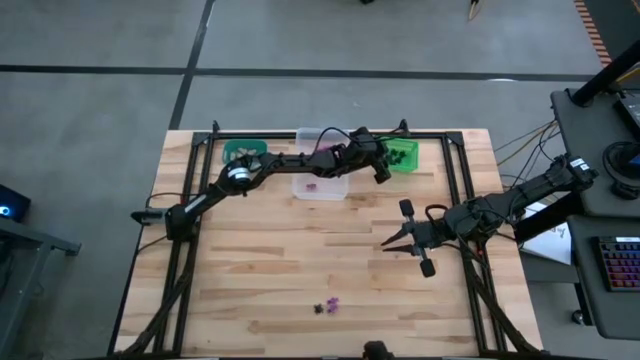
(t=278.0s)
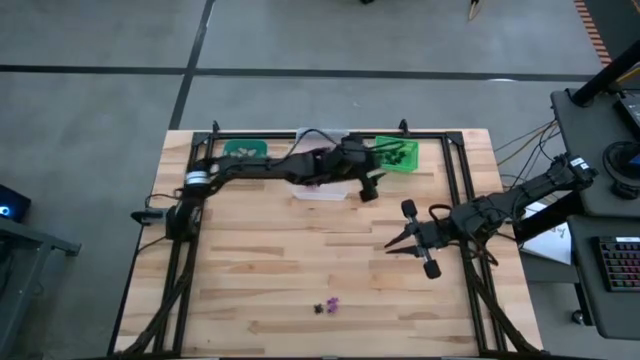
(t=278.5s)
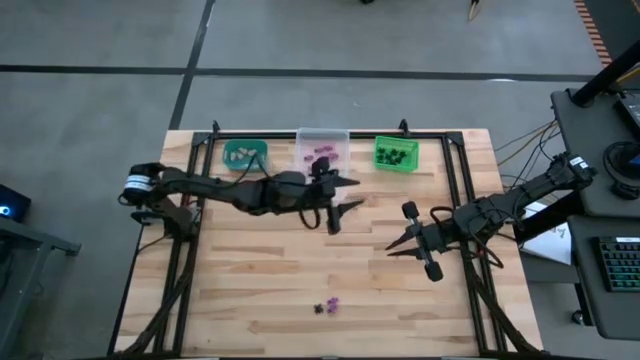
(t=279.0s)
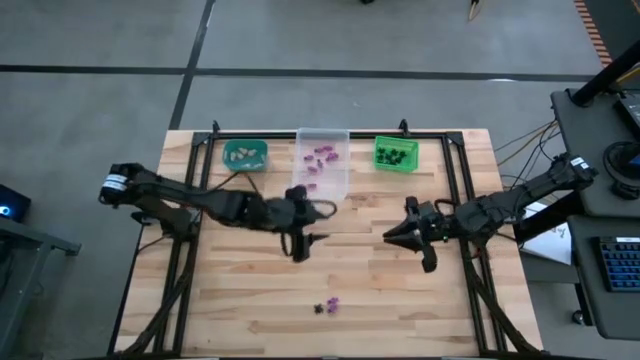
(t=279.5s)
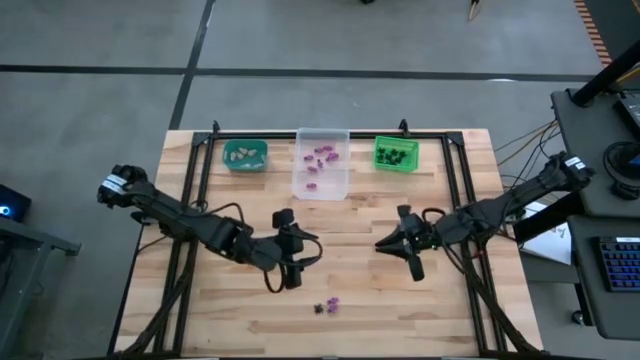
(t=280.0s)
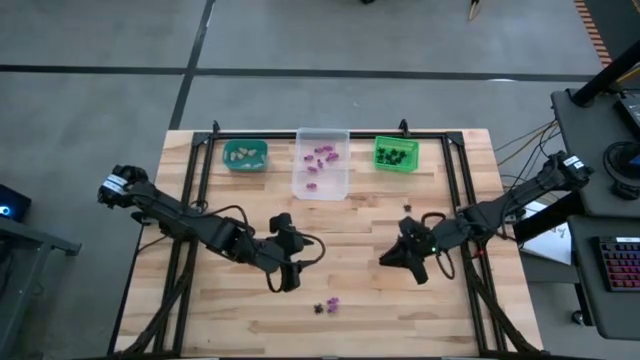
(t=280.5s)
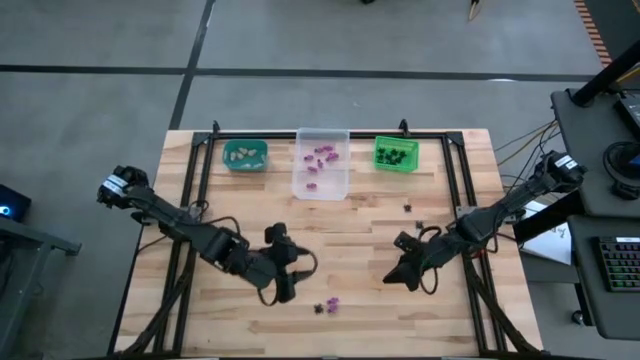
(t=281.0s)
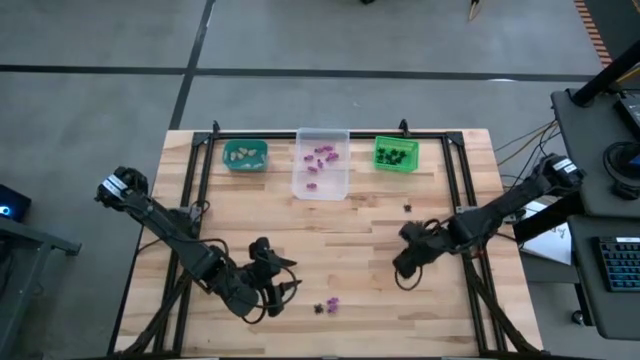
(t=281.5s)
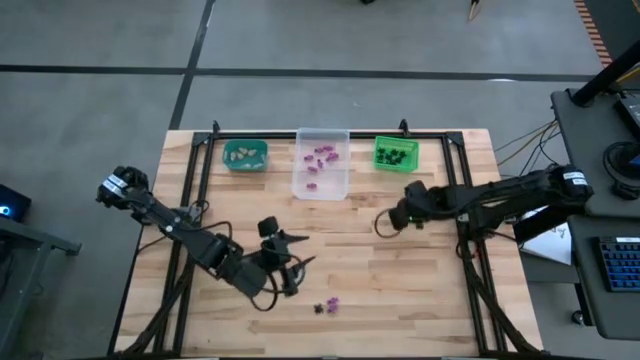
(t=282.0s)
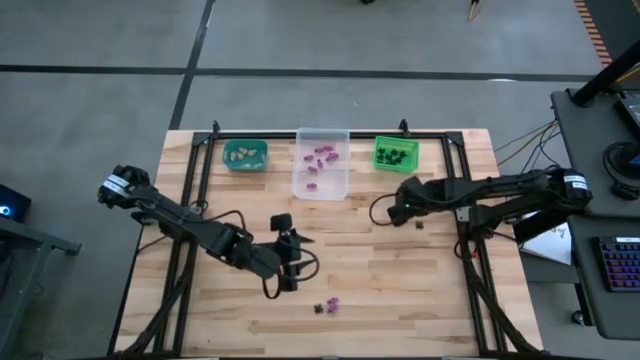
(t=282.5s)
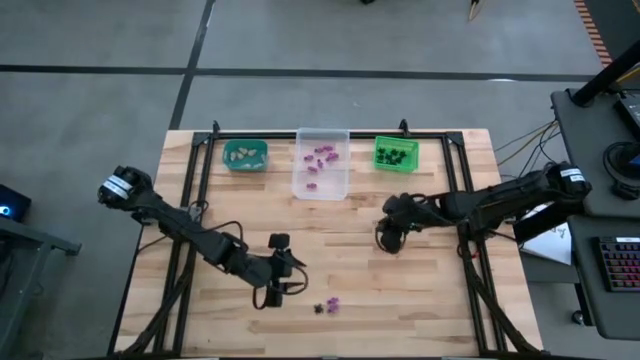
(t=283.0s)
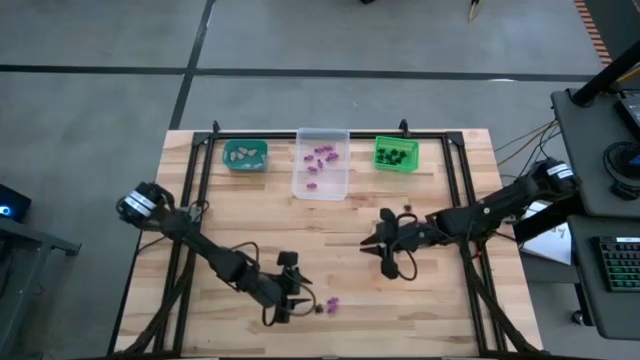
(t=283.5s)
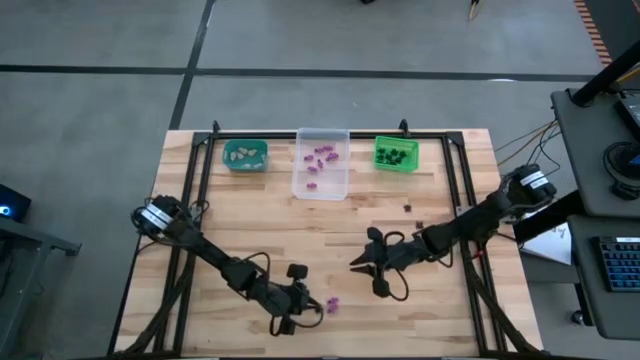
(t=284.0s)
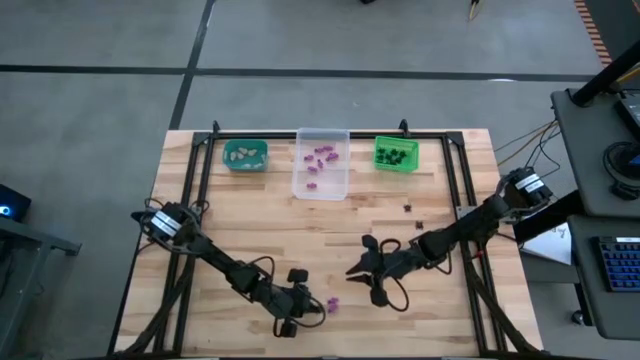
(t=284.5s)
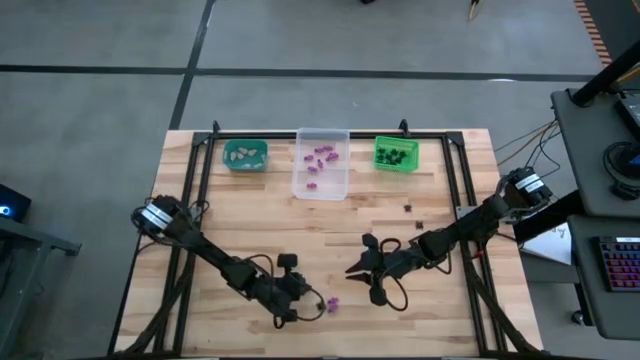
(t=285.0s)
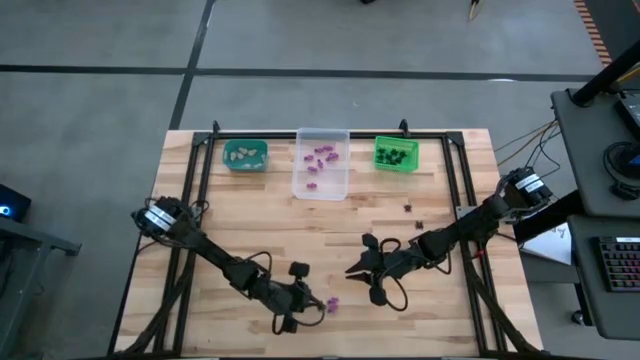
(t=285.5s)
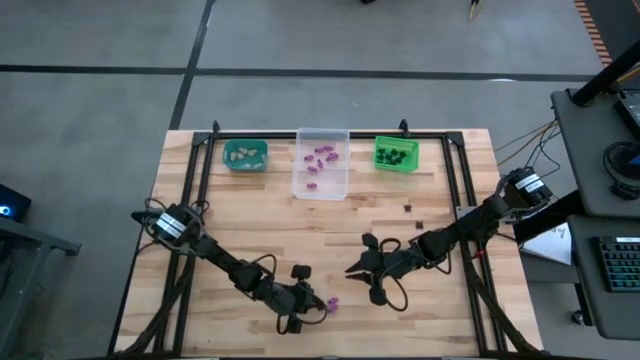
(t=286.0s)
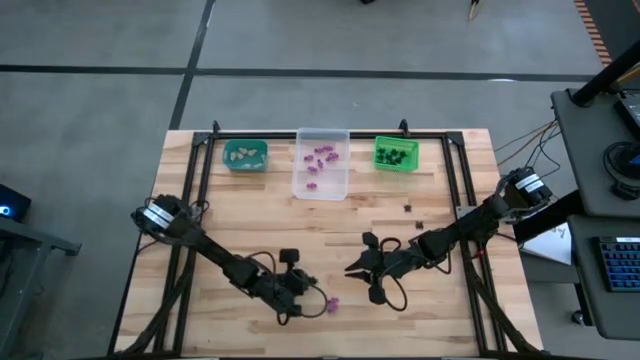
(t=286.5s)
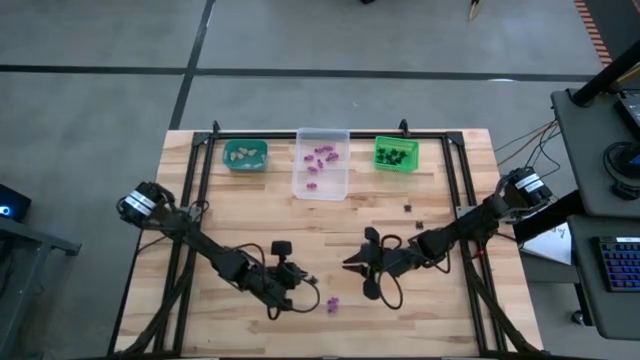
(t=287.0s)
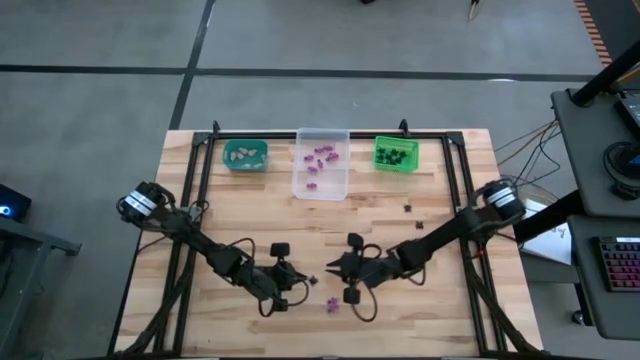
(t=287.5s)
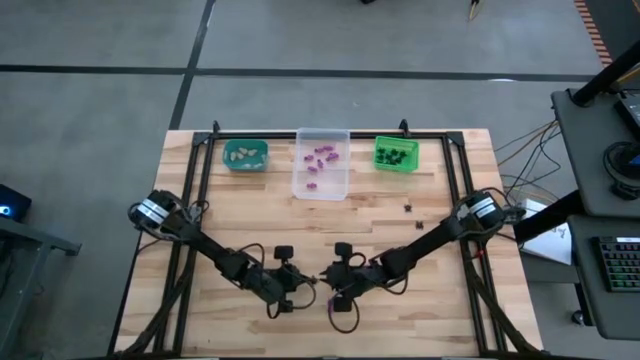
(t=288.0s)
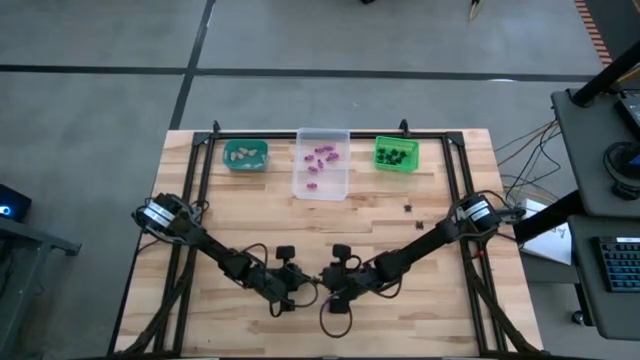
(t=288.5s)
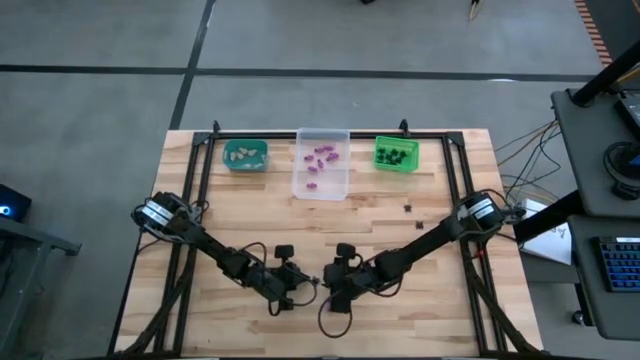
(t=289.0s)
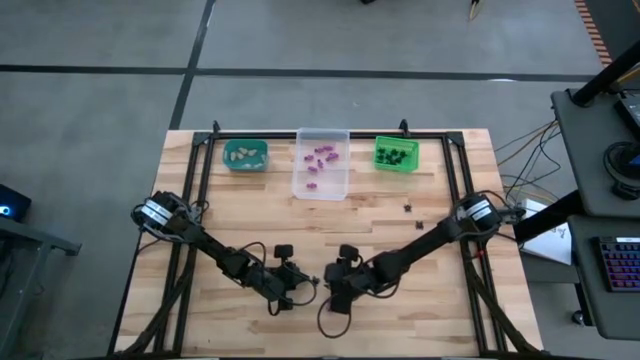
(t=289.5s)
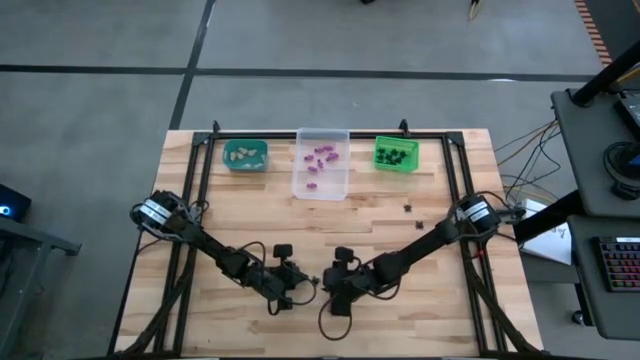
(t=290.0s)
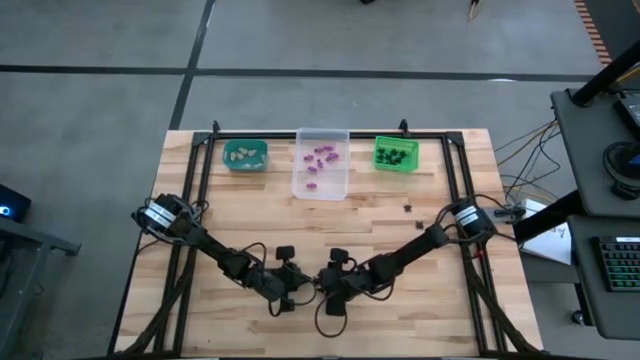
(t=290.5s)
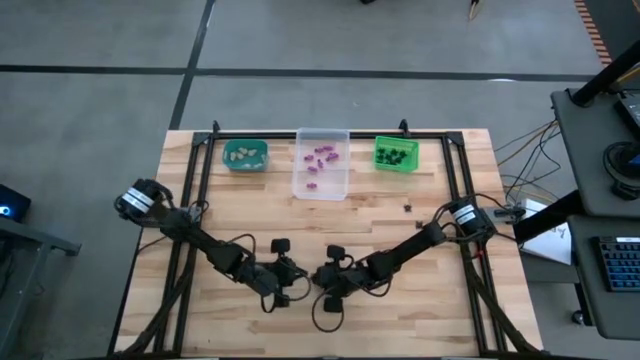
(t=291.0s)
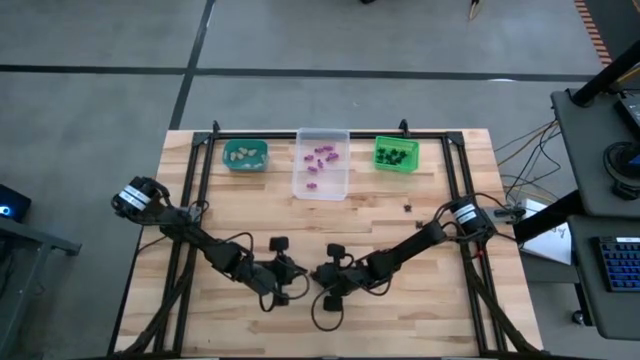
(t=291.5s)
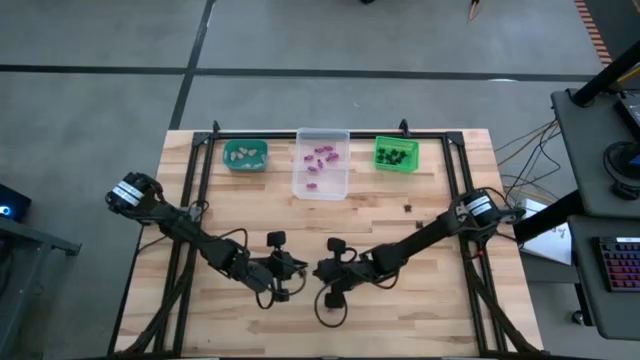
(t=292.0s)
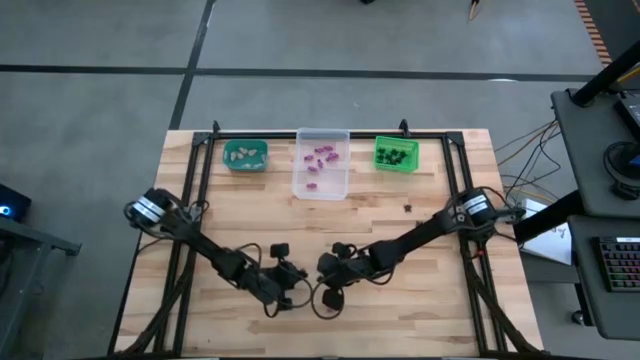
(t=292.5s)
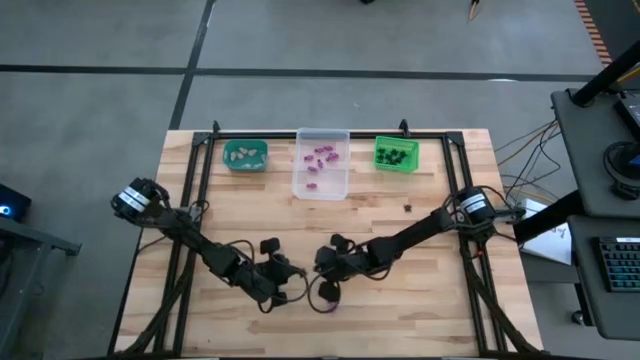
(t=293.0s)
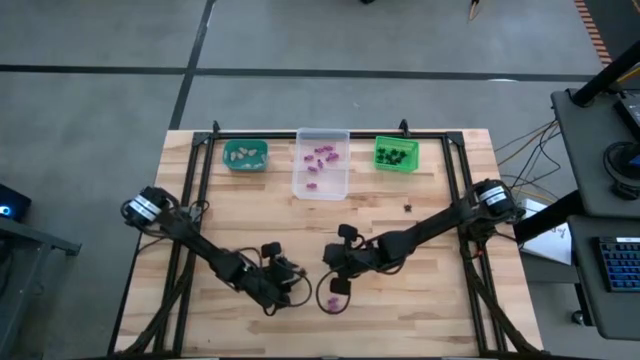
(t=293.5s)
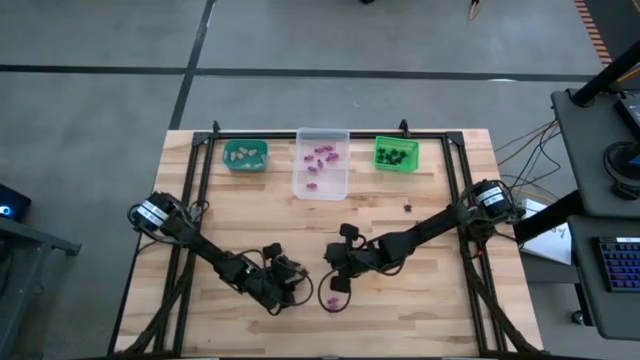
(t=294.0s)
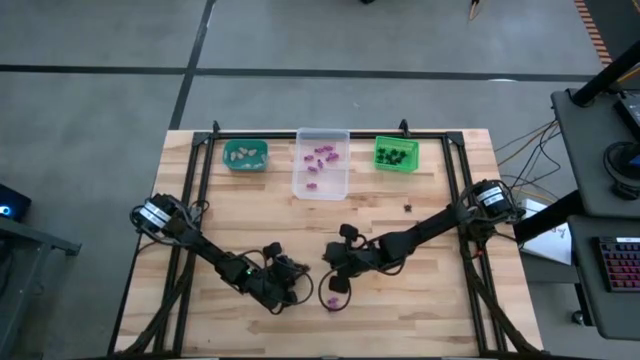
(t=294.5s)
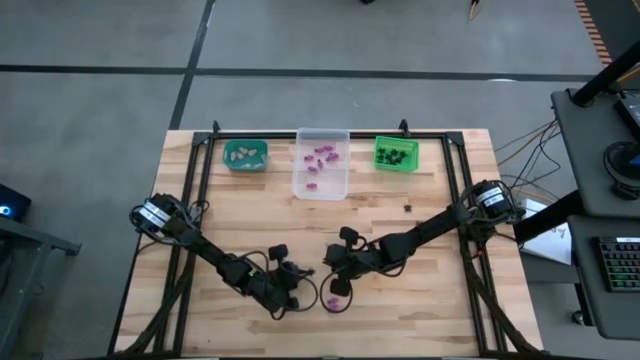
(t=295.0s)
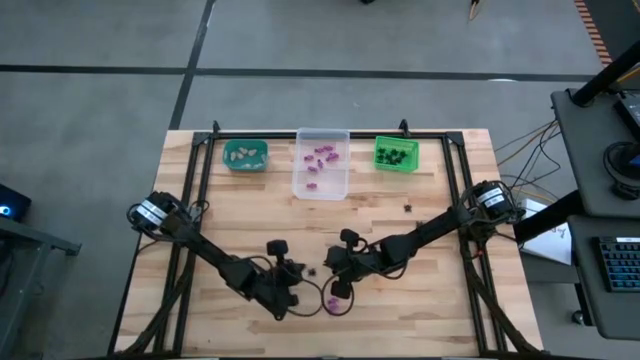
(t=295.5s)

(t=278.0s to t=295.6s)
Task: Sort Halloween decoration
Put the black spider toy into the green bin

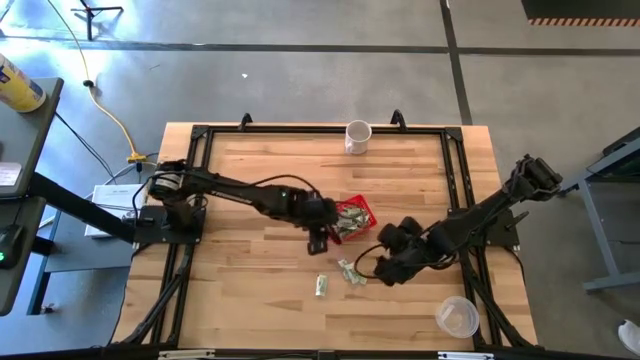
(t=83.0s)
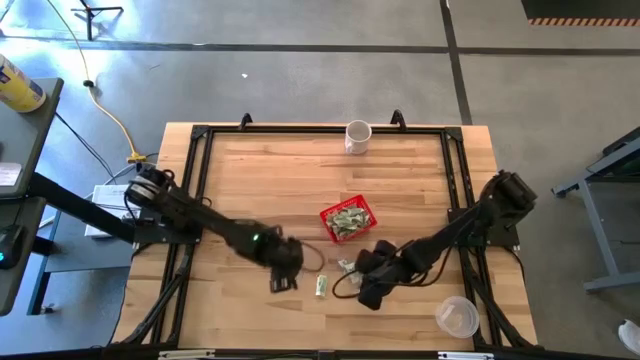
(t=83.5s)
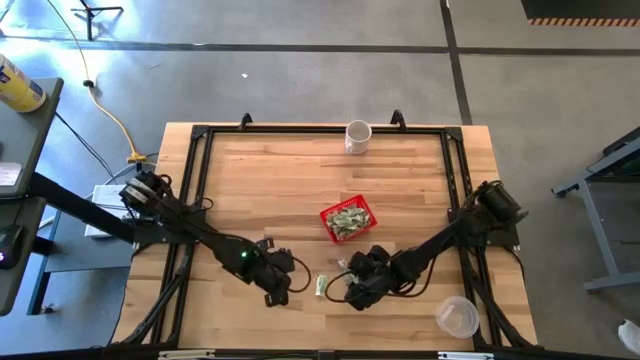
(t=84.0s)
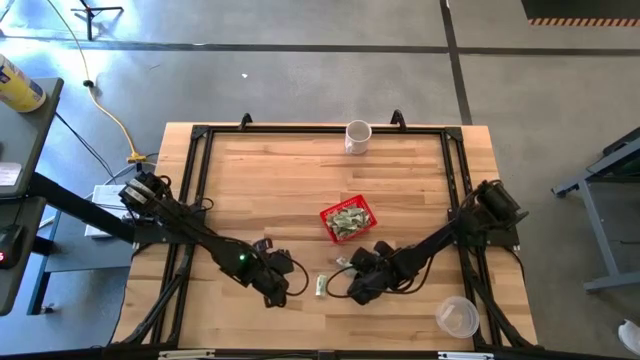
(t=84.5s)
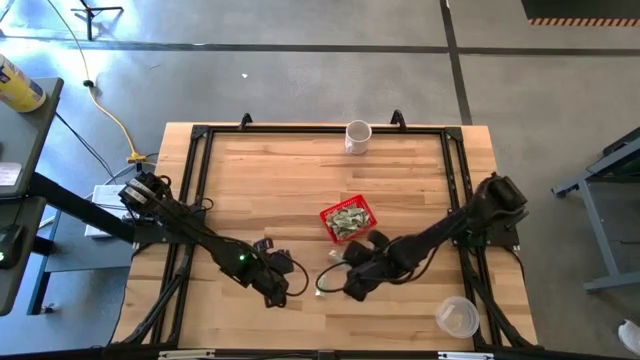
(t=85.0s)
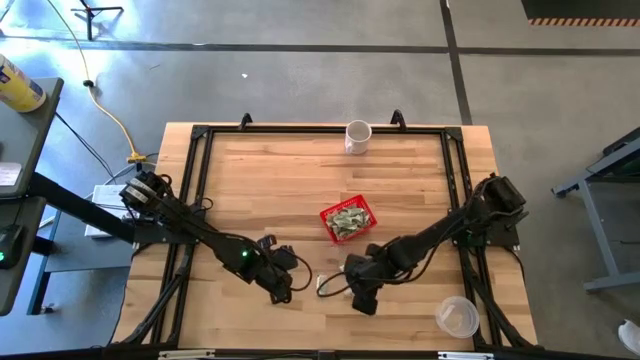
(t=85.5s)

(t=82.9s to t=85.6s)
Task: Pick and place items into bin
Put the white stevia packet into the red bin

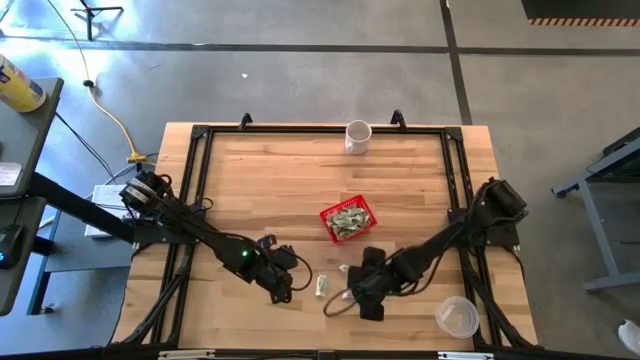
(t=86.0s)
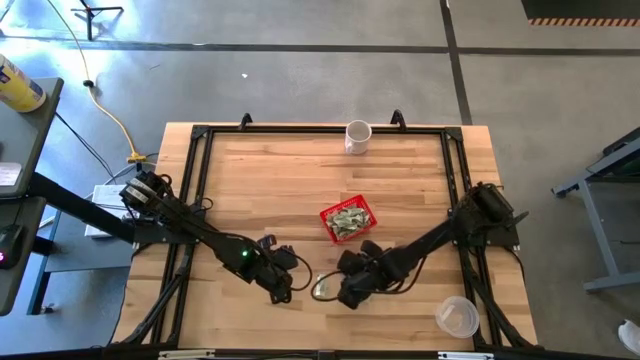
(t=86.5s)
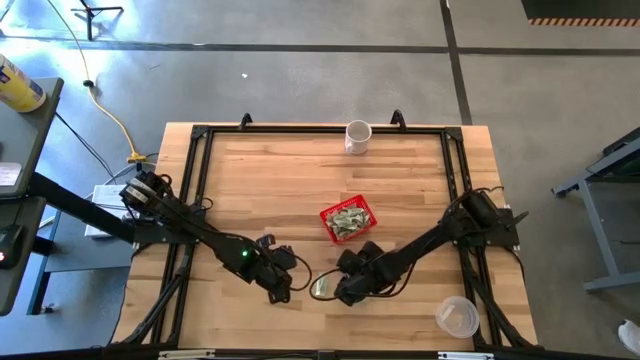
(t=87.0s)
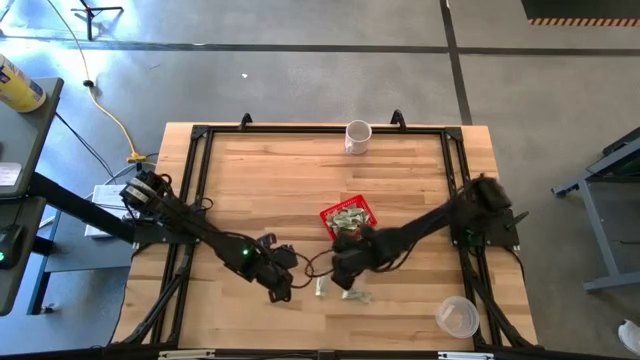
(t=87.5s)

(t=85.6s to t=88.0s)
Put the white stevia packet into the red bin
